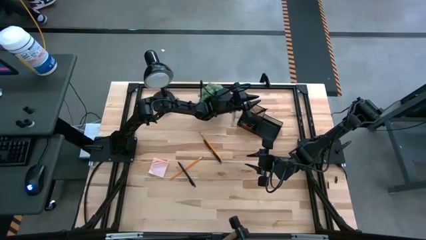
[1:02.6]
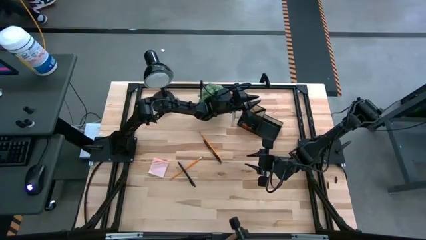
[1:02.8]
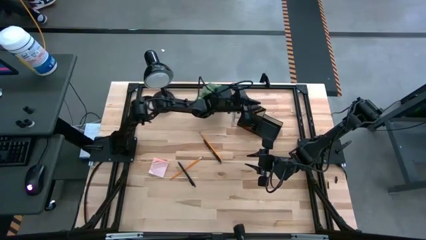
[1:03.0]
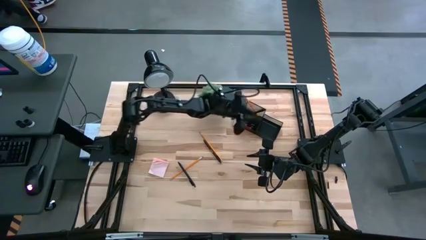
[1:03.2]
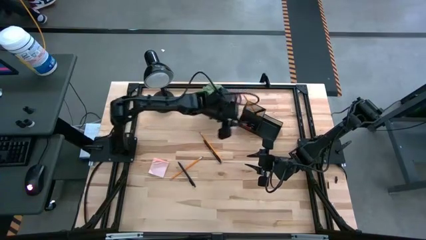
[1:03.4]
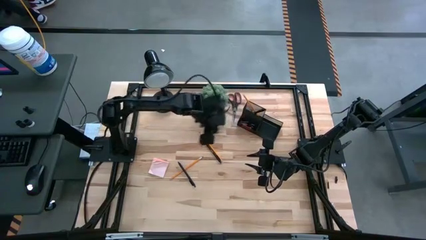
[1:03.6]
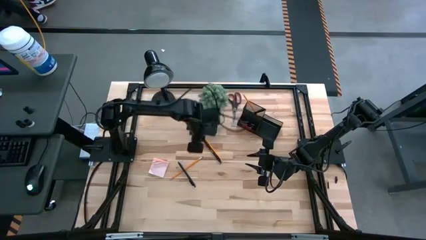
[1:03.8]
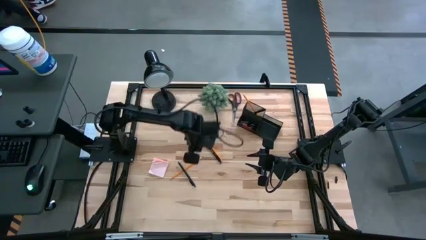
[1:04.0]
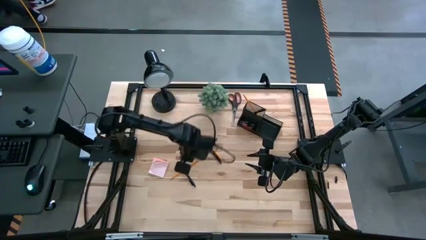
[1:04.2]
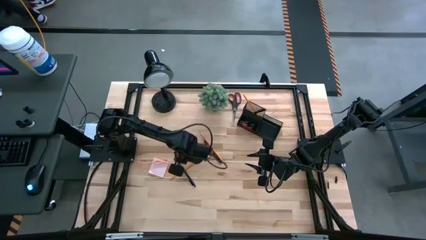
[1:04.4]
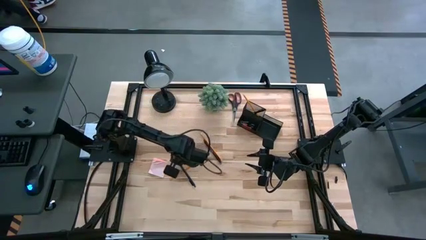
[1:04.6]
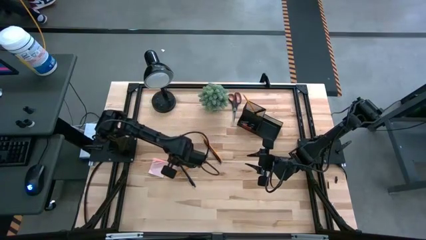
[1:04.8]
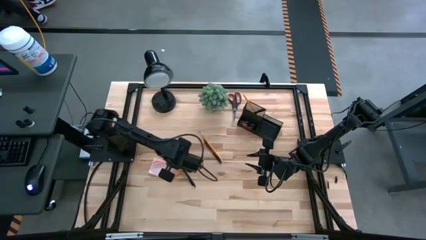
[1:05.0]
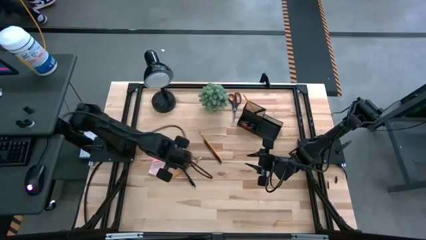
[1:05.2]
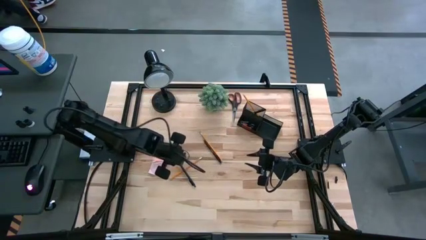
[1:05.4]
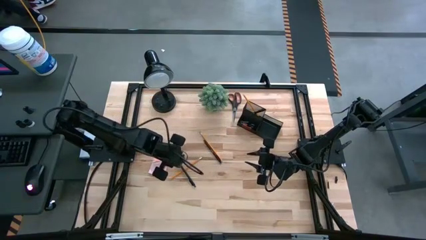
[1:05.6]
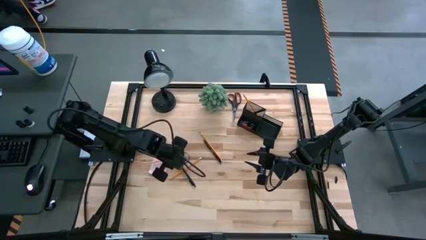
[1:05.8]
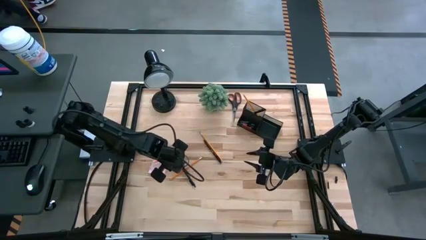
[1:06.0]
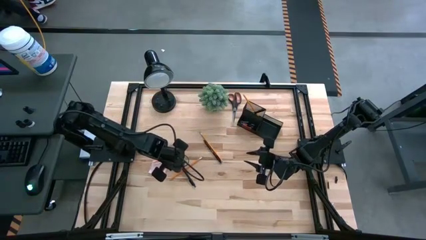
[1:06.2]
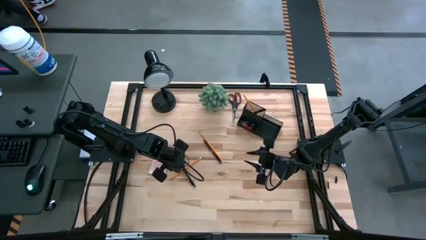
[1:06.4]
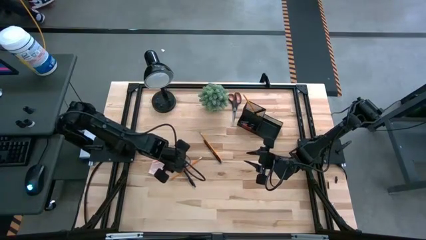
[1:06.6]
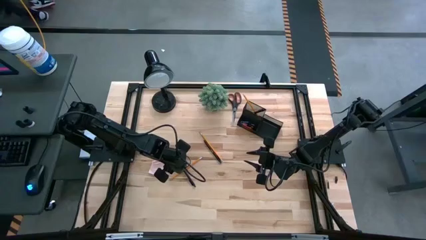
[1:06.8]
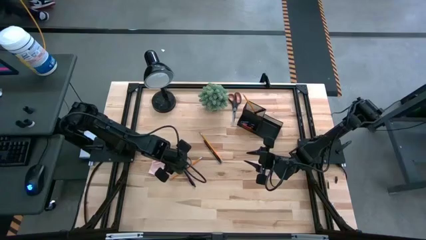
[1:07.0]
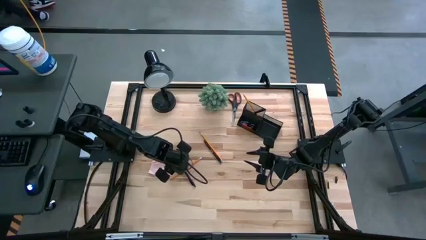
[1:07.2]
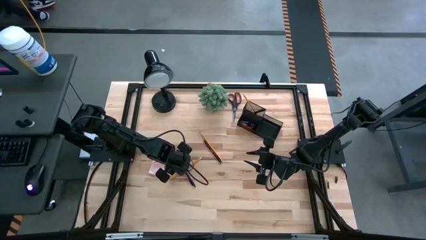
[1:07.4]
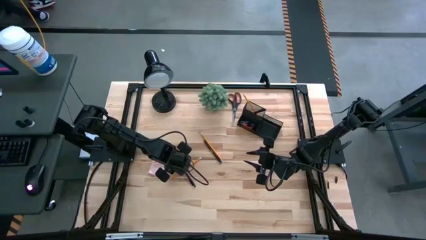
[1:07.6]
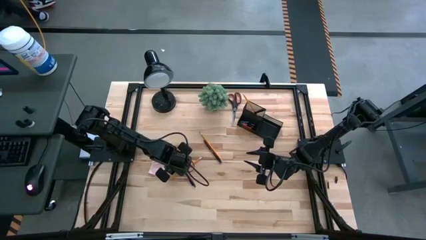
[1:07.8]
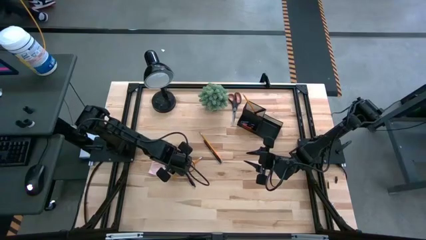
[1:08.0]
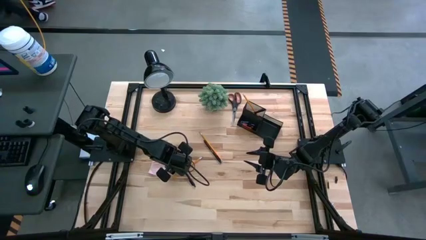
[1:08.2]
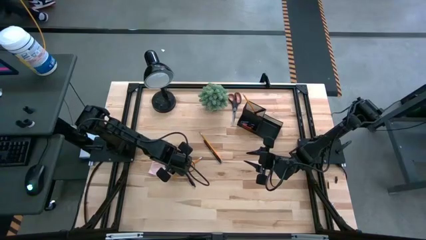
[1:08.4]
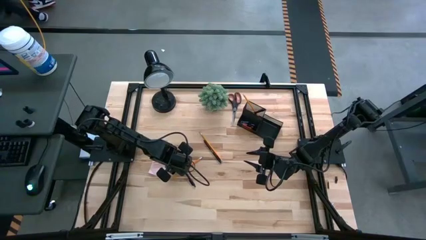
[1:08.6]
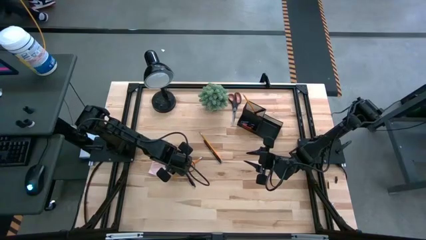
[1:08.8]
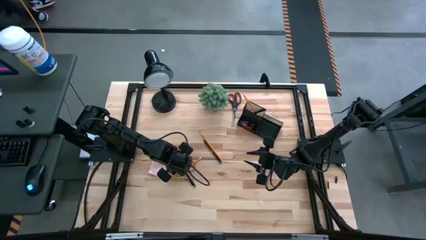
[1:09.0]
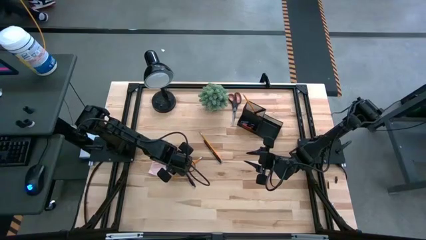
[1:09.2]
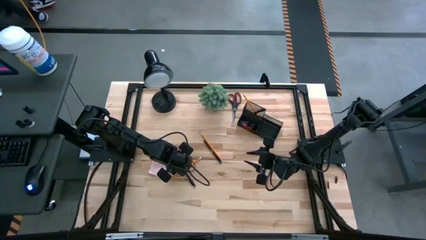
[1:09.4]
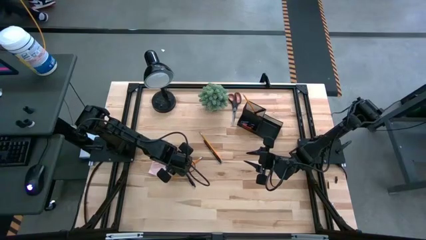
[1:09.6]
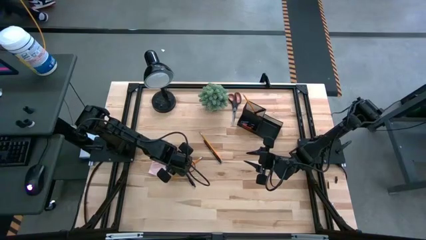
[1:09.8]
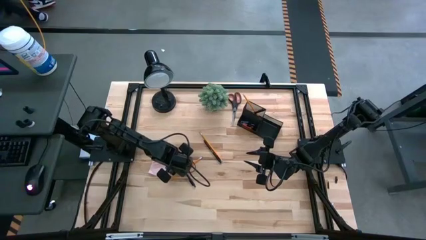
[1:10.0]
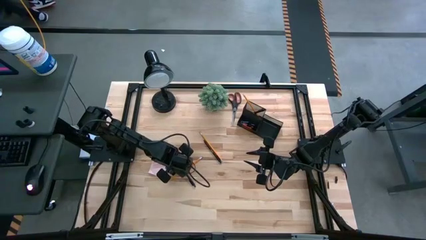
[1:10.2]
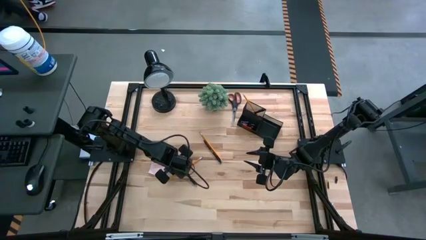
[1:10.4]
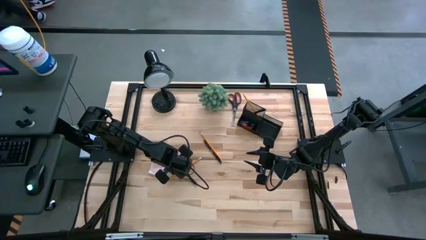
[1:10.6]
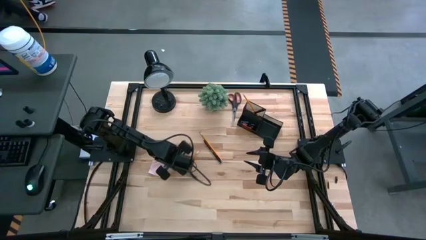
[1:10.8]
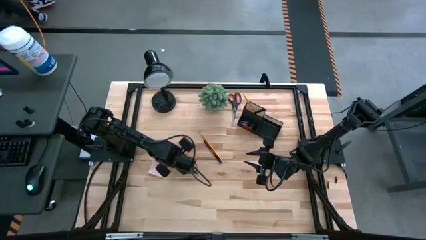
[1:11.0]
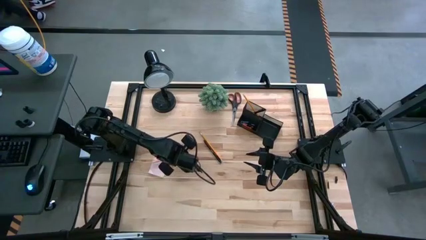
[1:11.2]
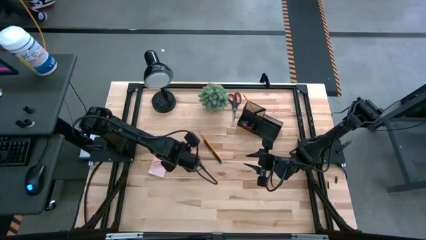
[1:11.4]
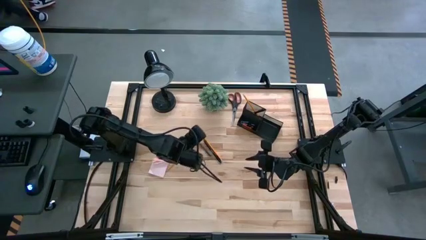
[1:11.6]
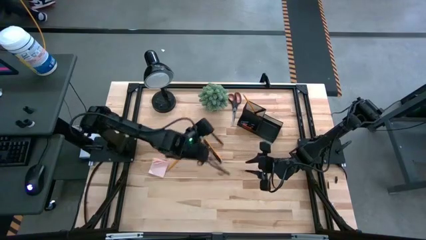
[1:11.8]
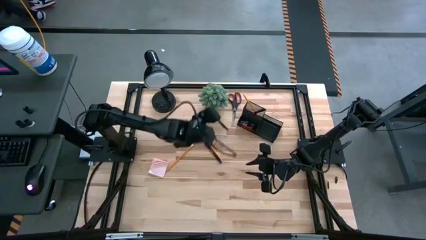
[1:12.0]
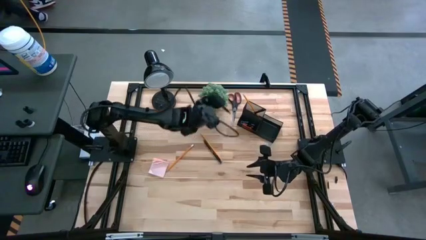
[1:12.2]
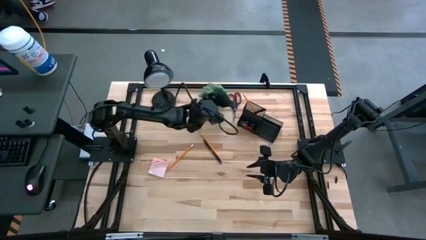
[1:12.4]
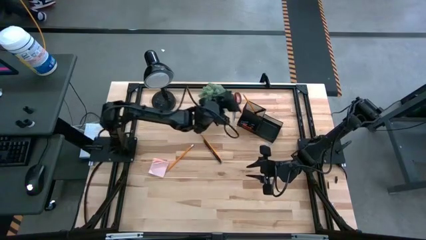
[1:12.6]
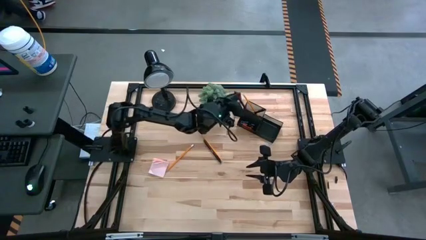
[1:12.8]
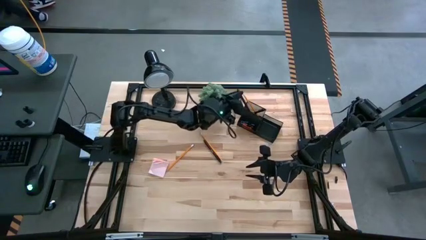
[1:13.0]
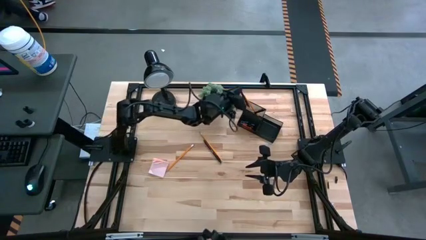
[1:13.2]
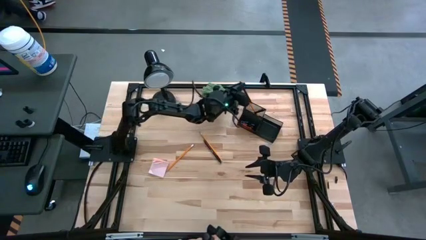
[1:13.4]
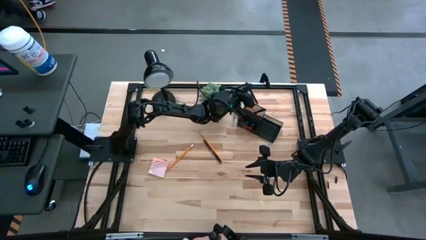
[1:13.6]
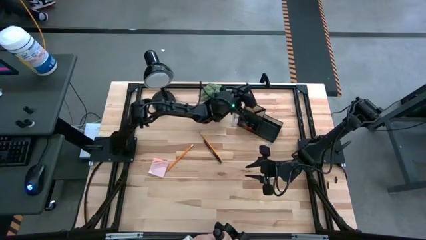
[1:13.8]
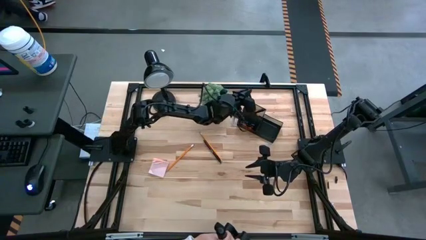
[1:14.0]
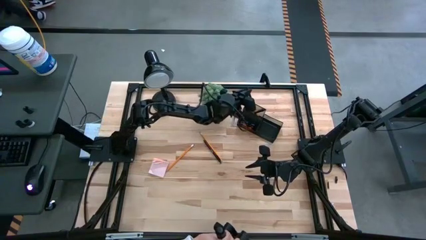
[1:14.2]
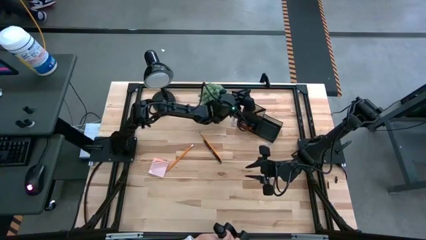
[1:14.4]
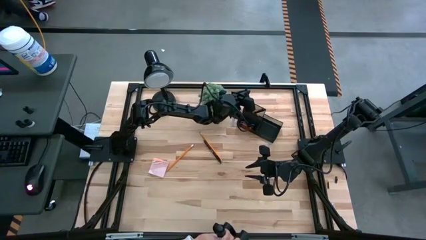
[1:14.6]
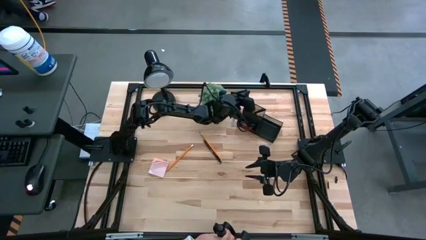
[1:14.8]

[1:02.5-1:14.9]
Task: Pick and place office supplies into organizer
Put the left black pen into the black desk organizer
